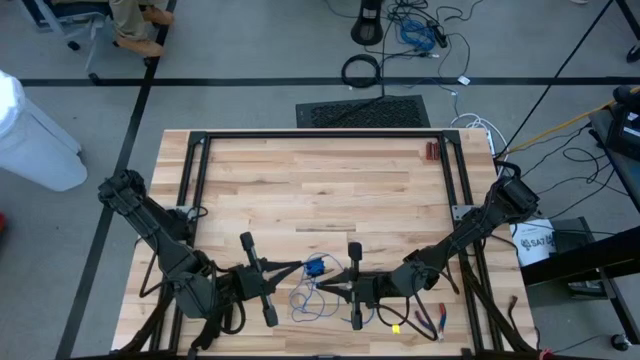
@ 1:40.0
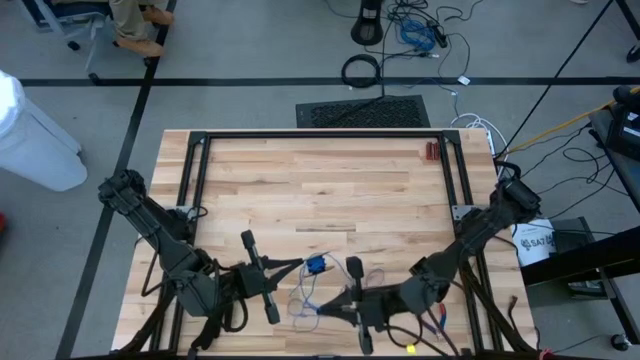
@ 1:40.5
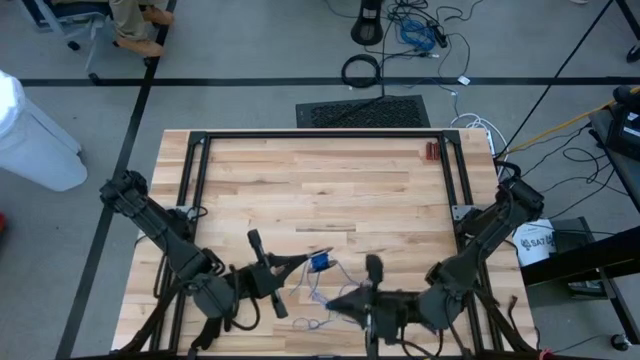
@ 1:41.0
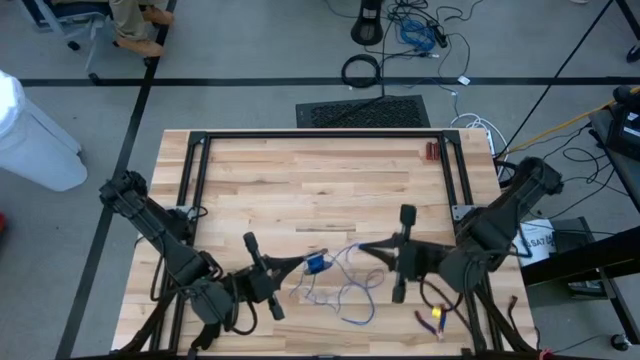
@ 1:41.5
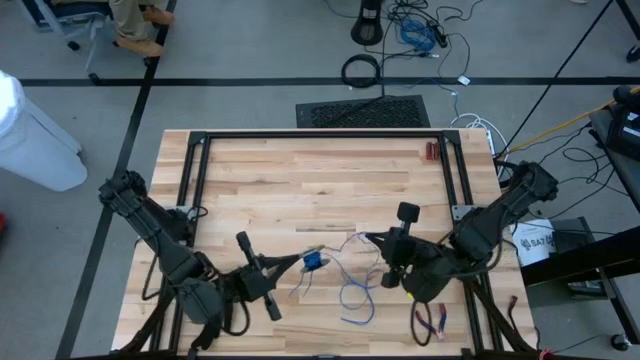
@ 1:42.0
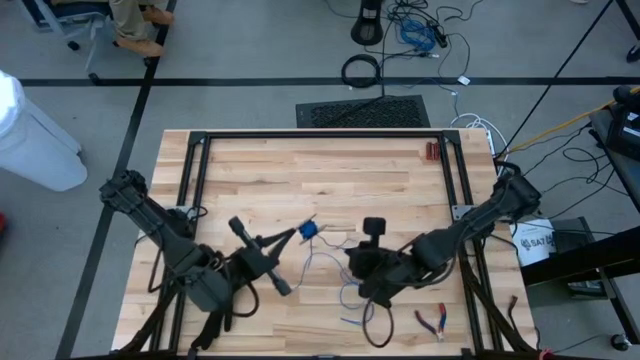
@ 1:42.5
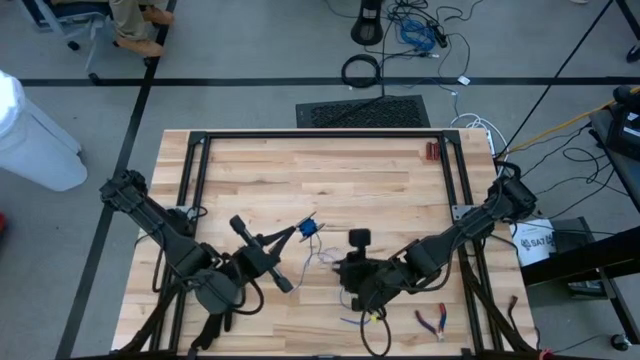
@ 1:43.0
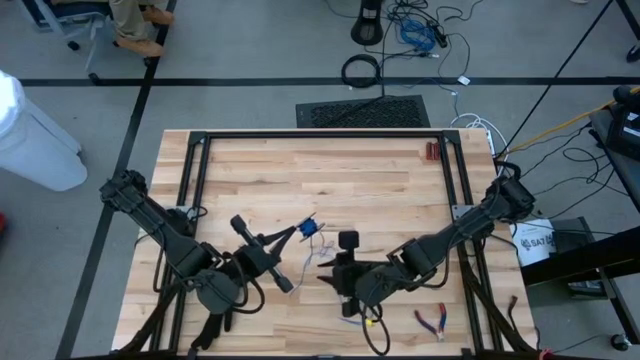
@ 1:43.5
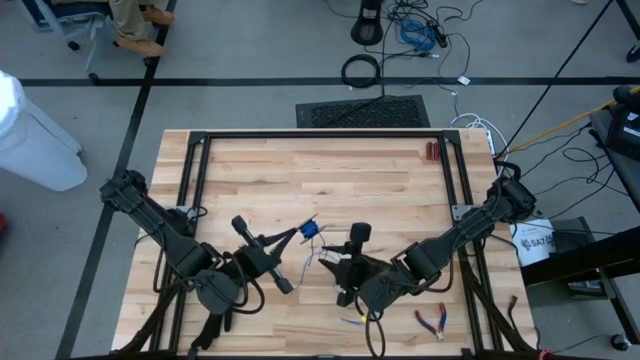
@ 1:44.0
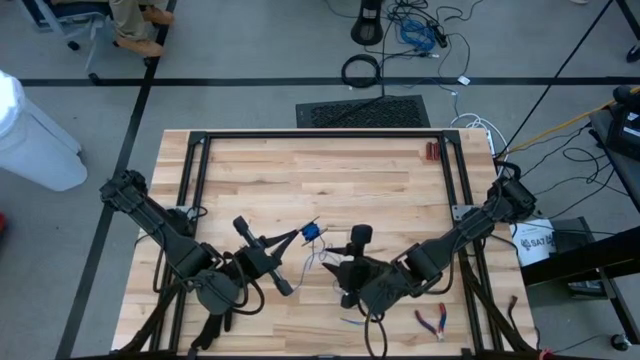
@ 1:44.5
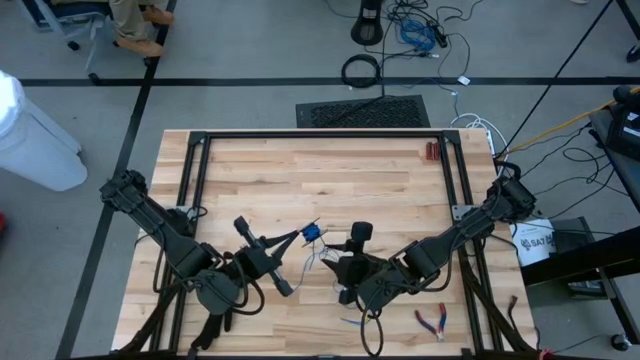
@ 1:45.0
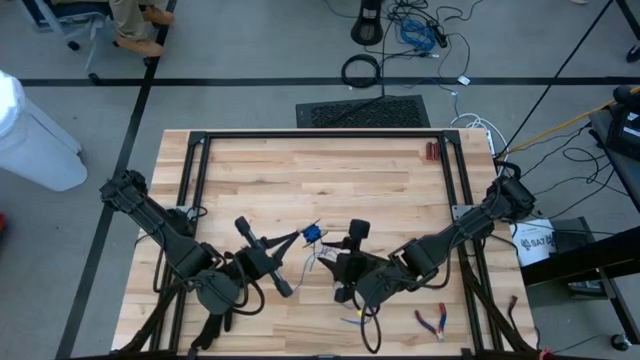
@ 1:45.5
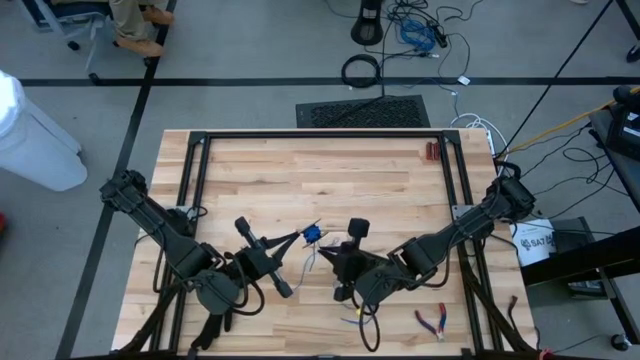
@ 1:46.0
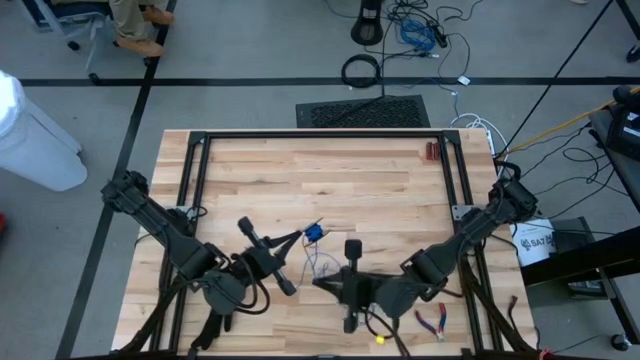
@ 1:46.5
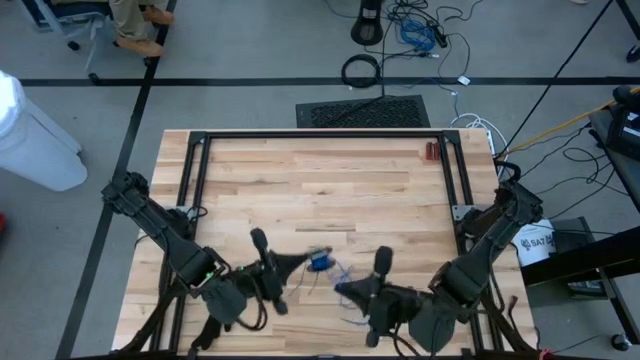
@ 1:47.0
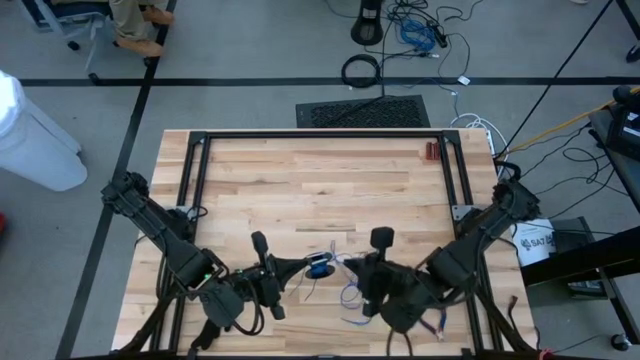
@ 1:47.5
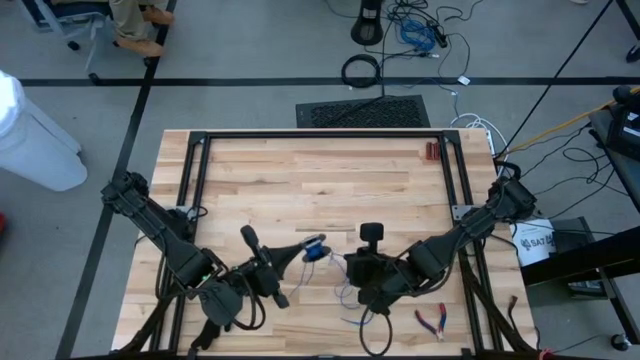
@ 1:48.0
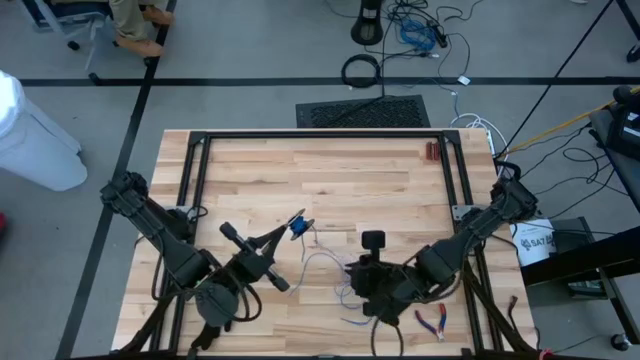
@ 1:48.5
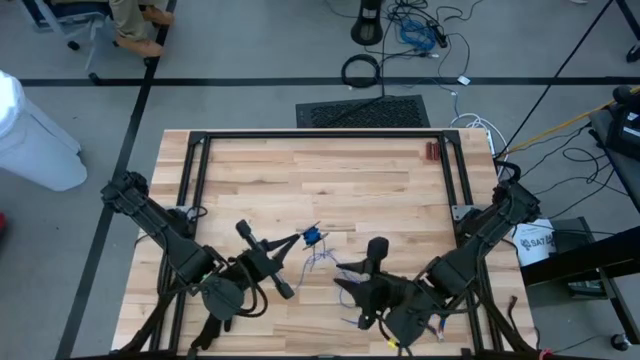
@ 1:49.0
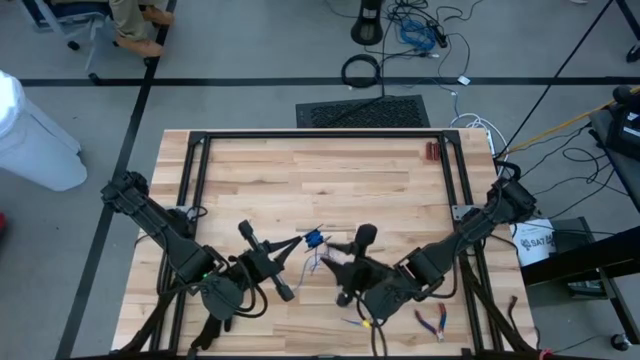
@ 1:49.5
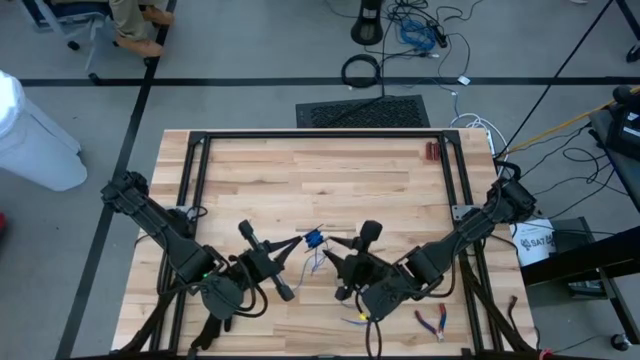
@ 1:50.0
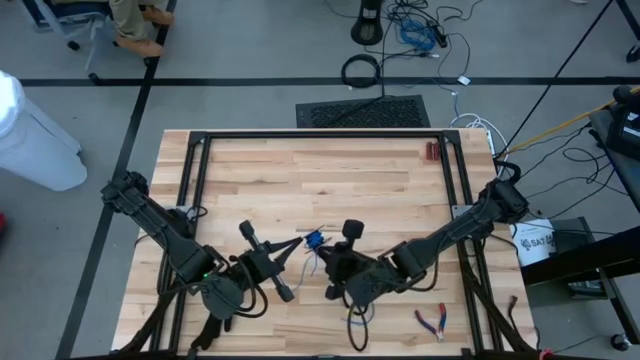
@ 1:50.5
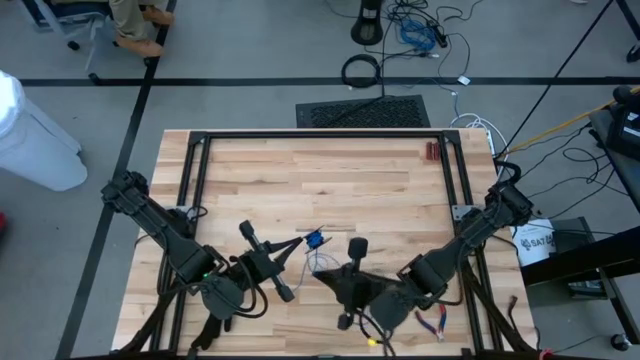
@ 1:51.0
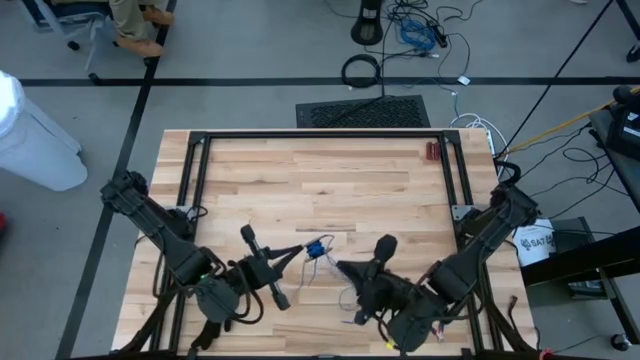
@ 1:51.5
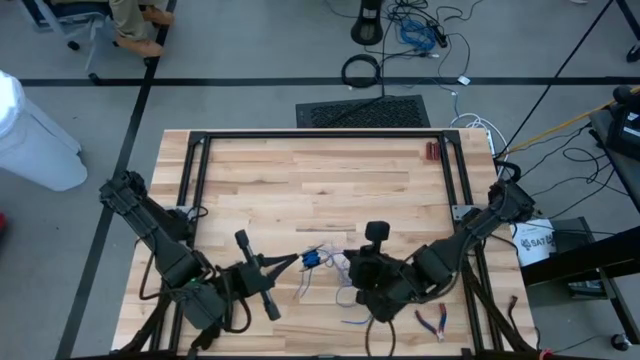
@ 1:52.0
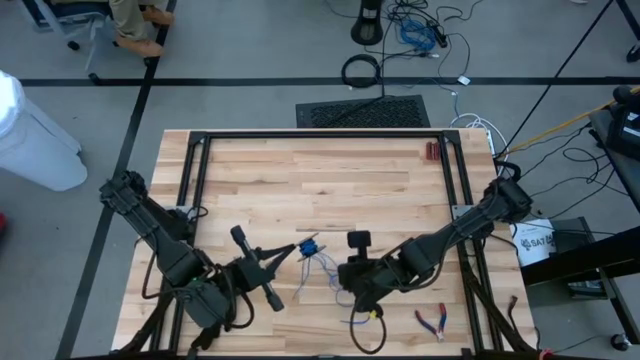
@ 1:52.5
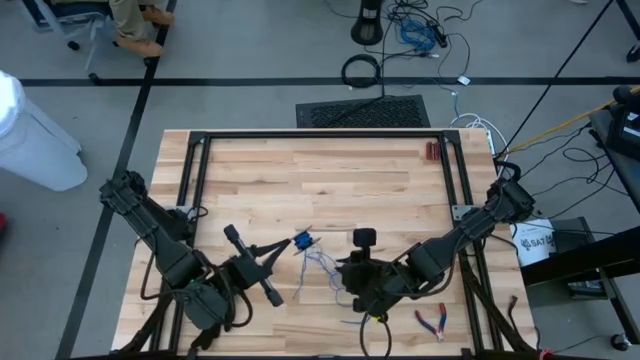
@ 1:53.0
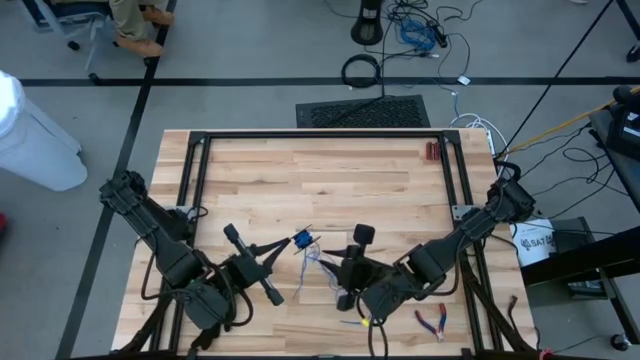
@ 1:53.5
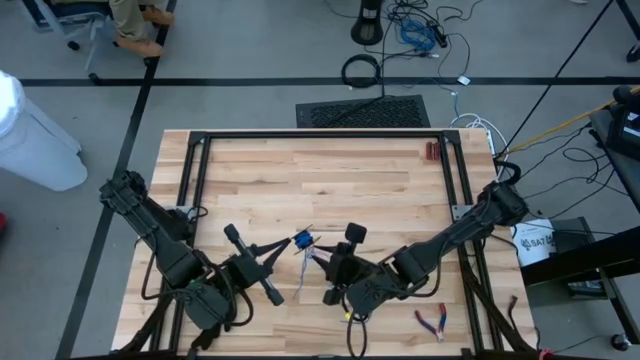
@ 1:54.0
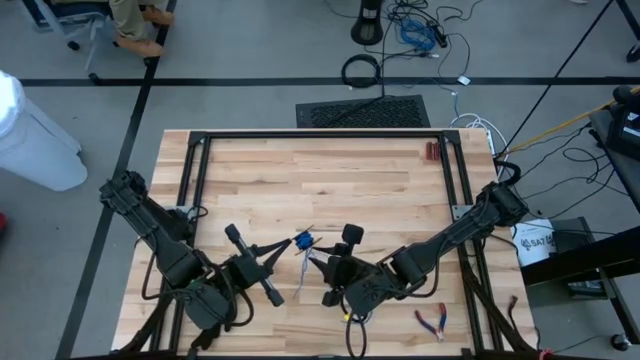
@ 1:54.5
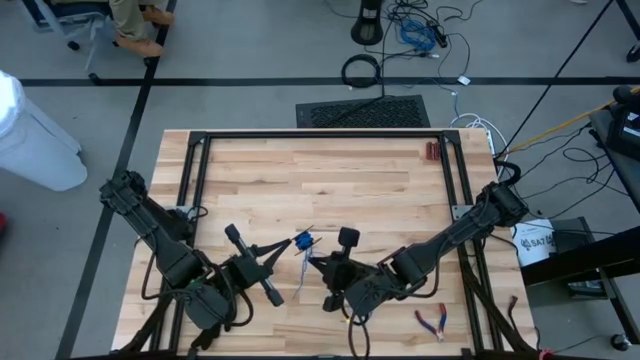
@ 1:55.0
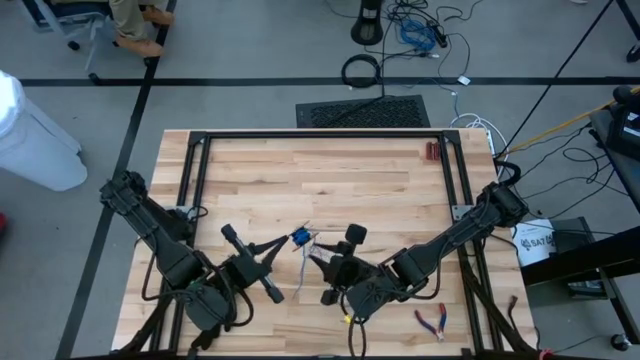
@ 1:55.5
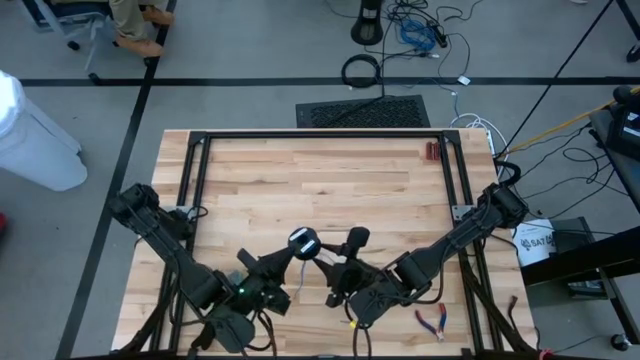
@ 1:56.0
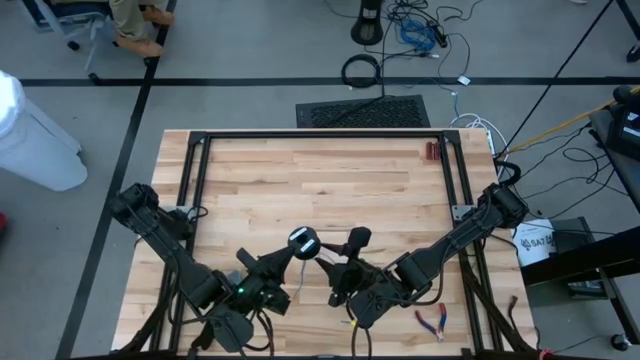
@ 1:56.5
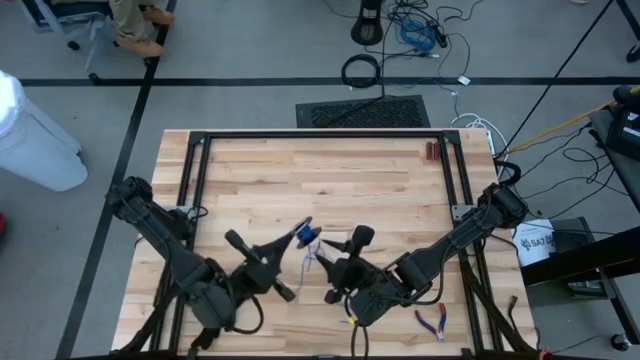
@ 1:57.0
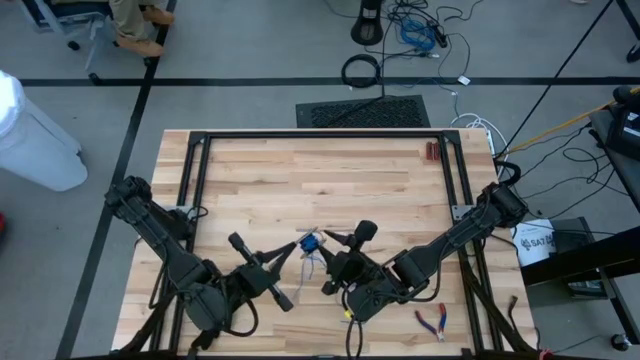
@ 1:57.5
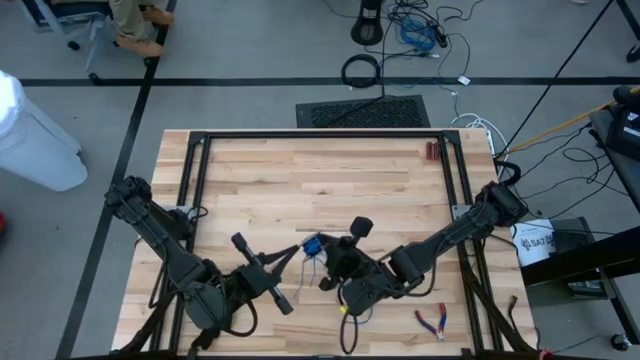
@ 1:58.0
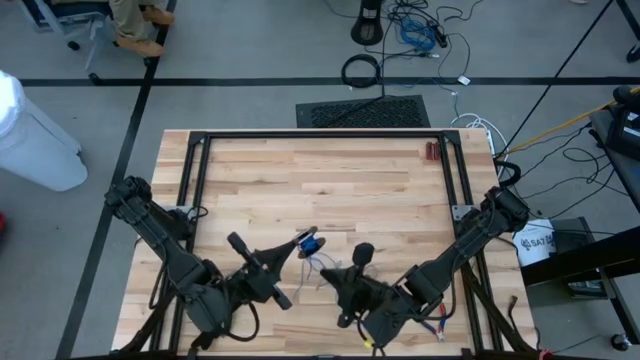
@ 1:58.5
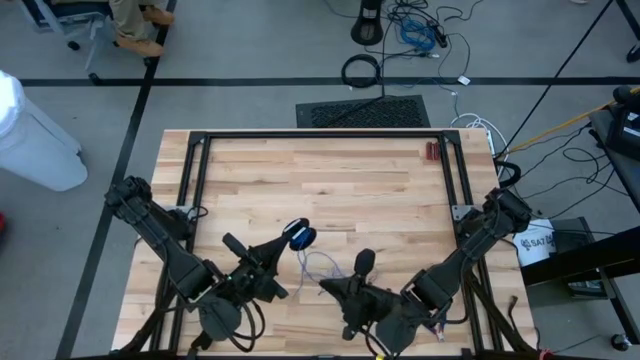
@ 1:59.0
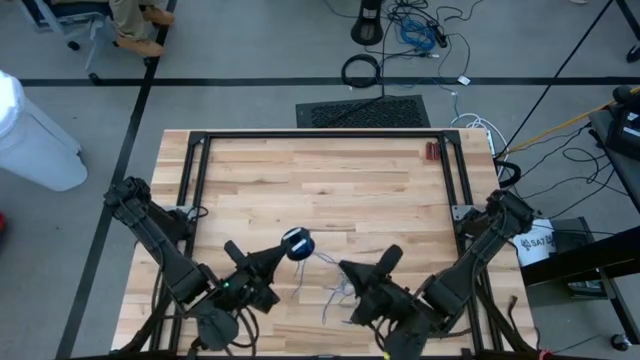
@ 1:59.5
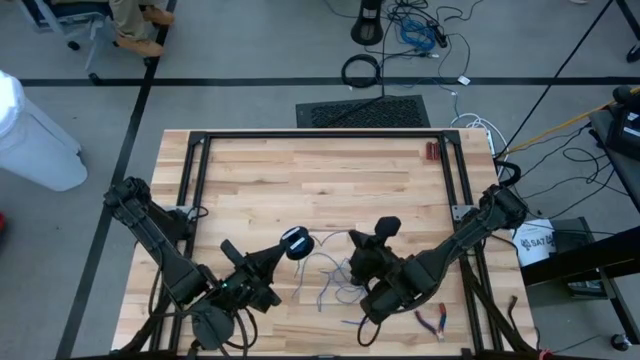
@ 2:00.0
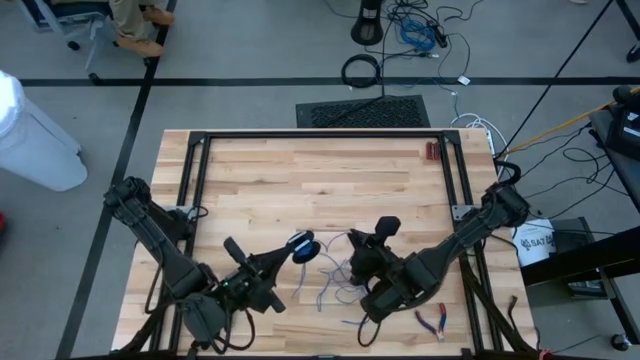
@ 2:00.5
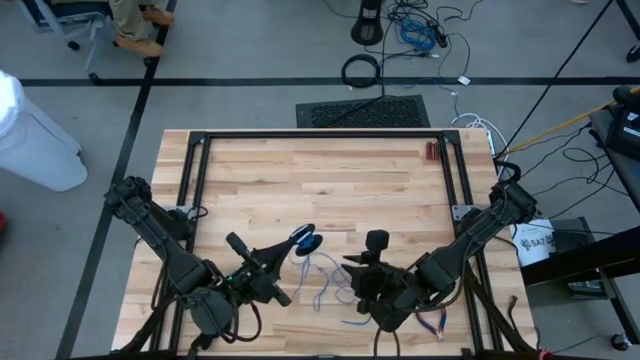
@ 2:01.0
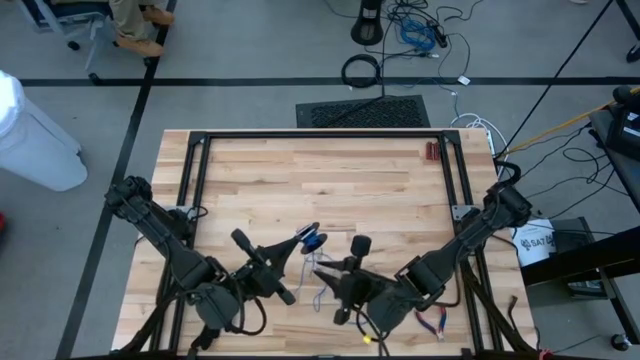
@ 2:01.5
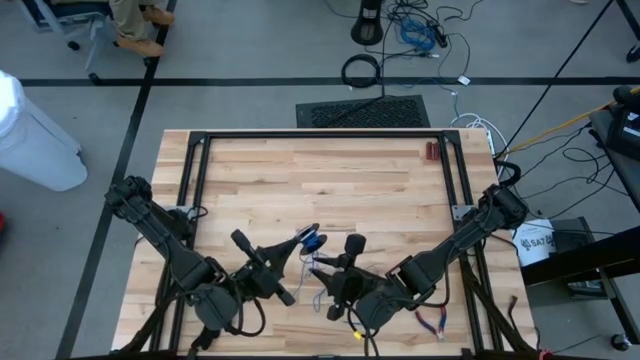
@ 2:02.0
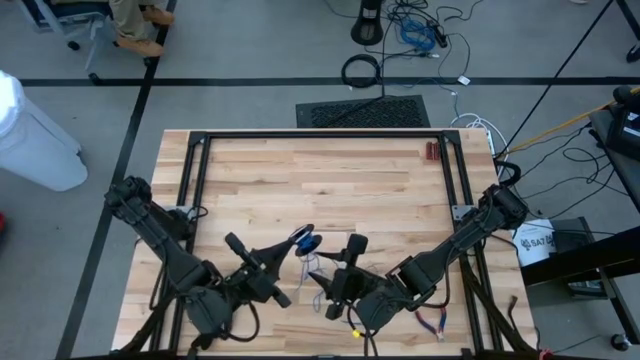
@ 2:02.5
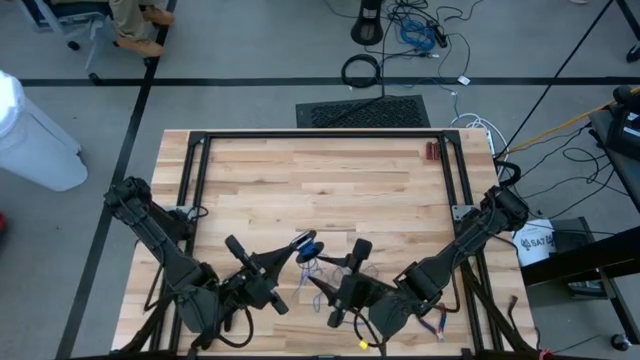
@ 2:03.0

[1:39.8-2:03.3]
Task: Coil cords
Uncoil the blue wire from the black spool
